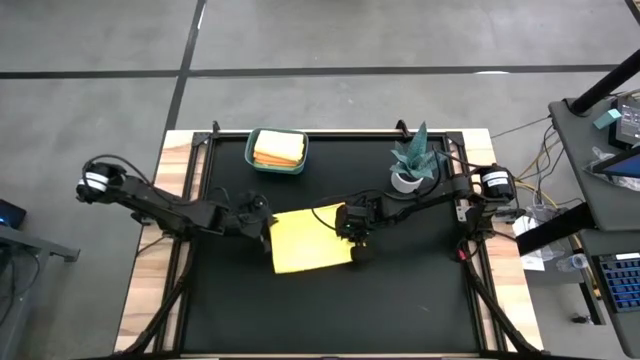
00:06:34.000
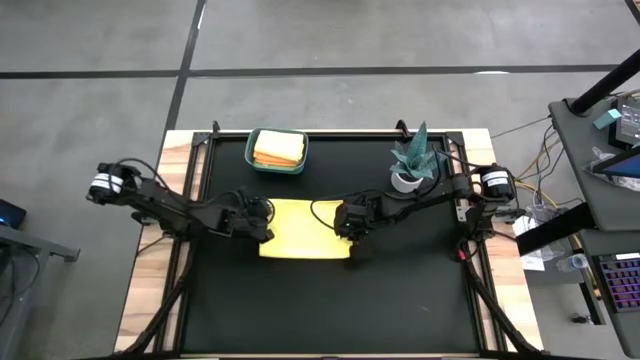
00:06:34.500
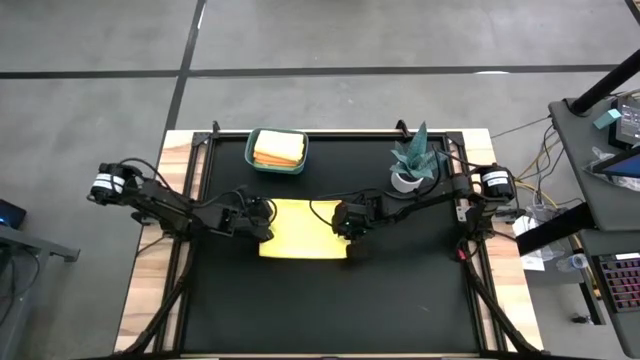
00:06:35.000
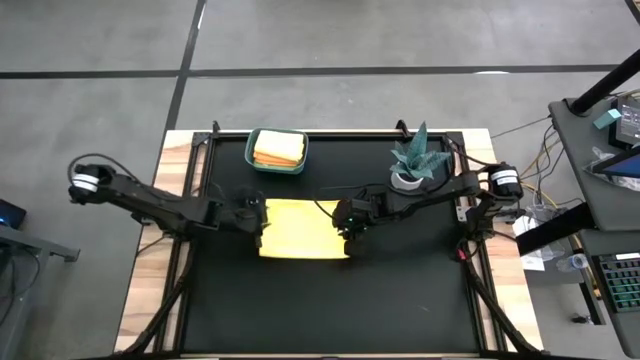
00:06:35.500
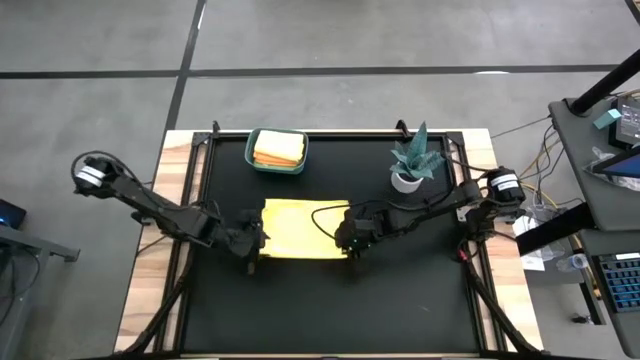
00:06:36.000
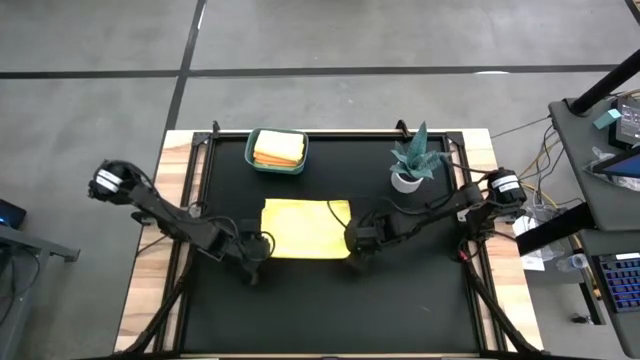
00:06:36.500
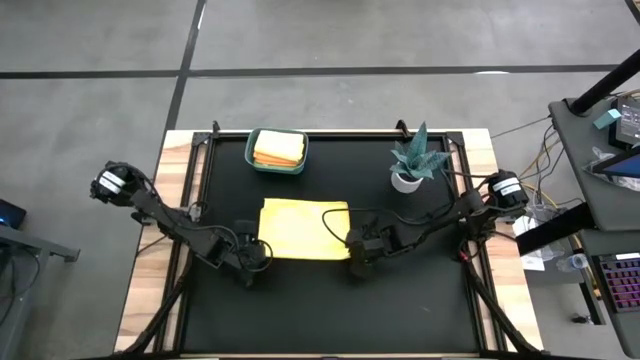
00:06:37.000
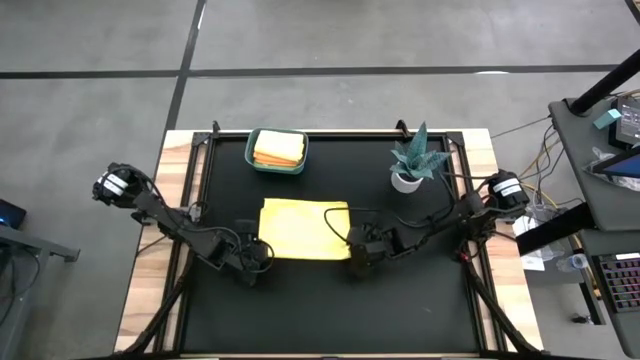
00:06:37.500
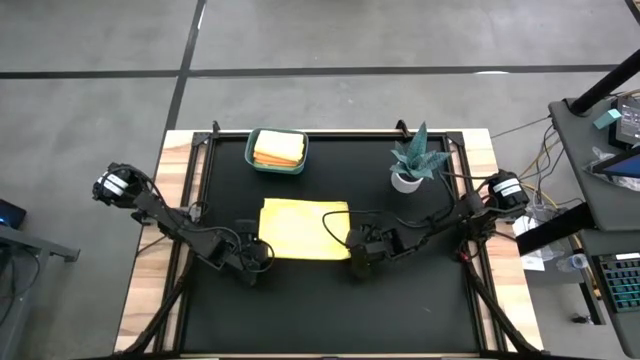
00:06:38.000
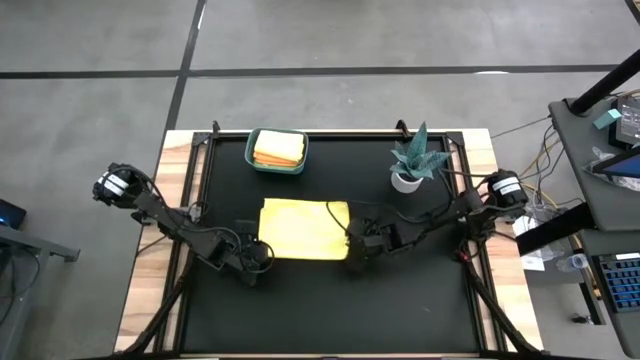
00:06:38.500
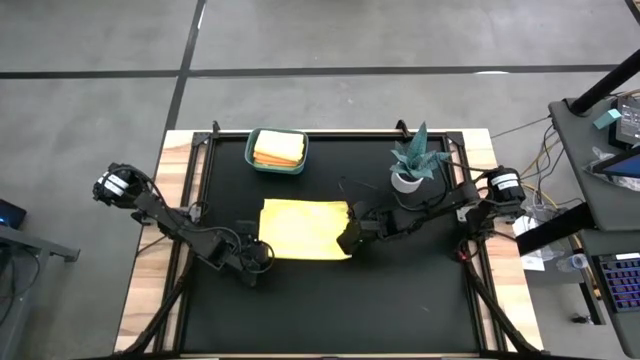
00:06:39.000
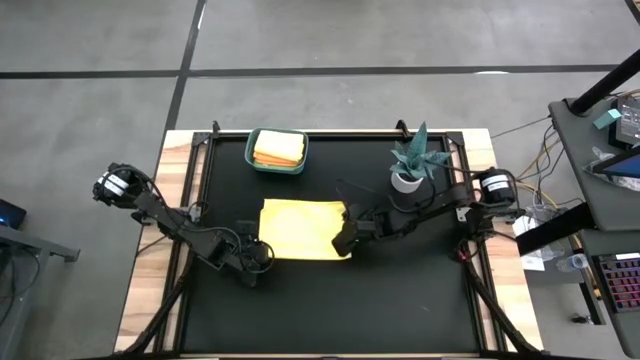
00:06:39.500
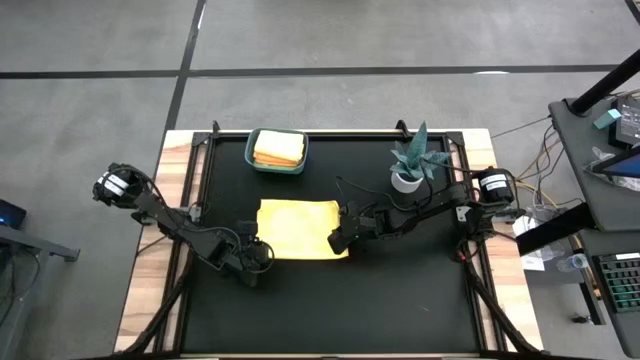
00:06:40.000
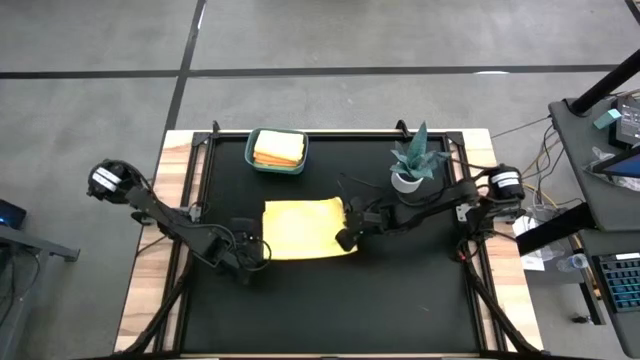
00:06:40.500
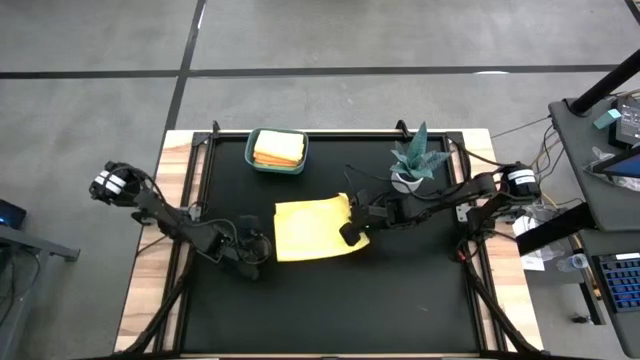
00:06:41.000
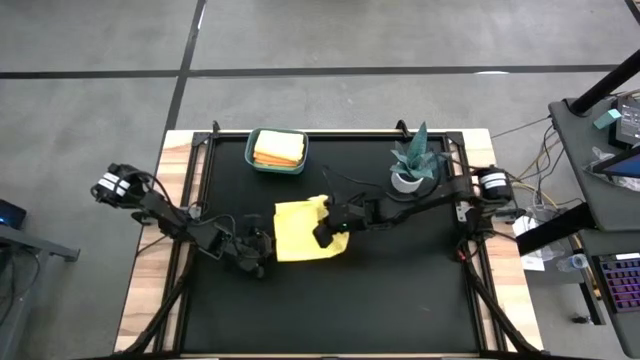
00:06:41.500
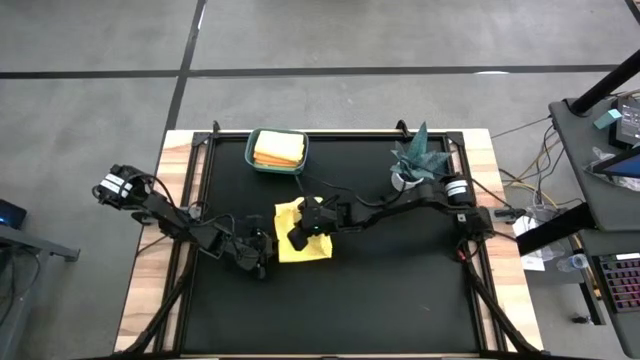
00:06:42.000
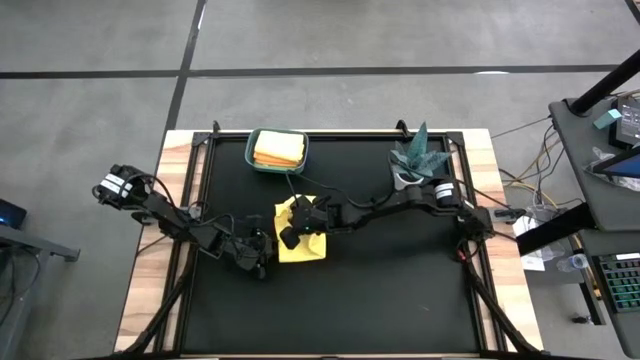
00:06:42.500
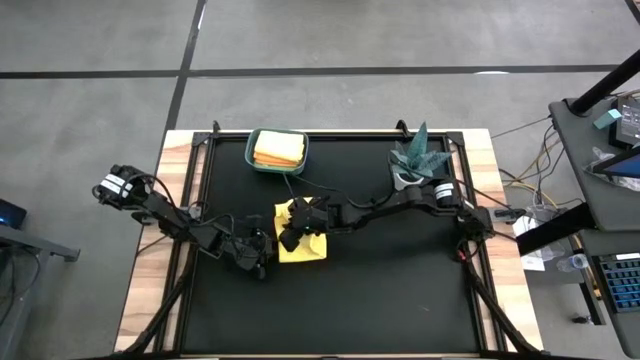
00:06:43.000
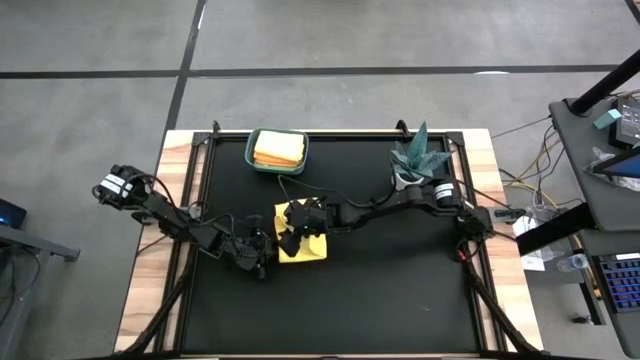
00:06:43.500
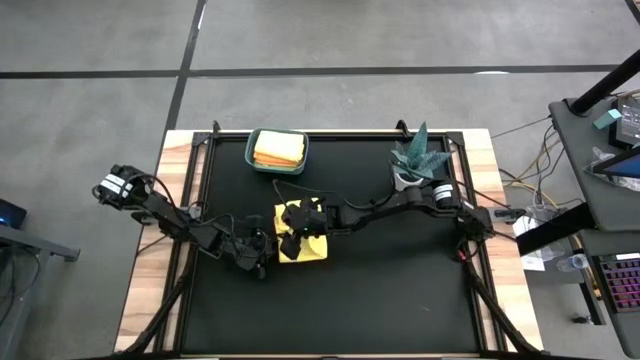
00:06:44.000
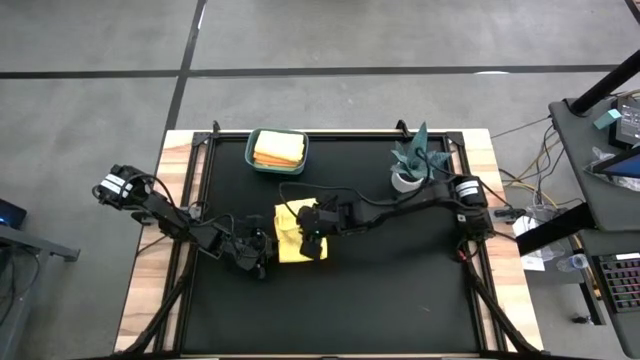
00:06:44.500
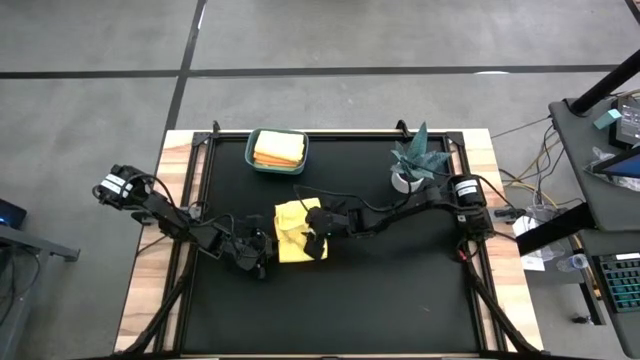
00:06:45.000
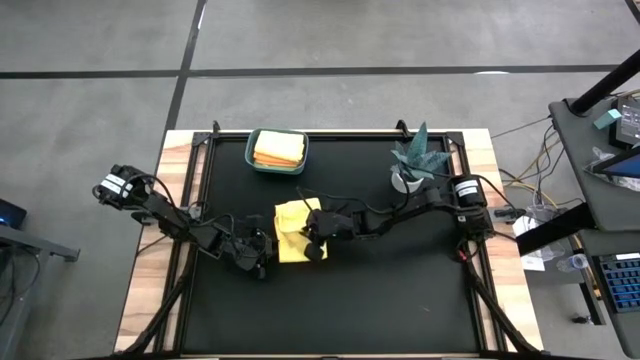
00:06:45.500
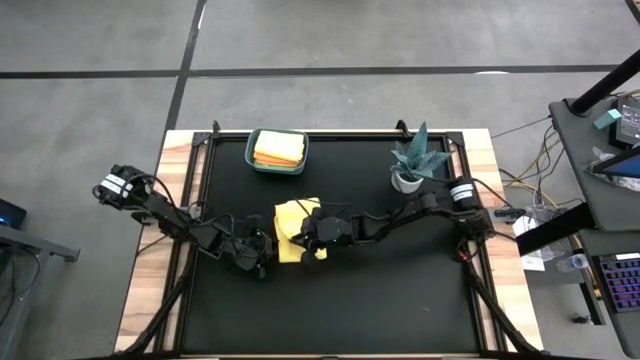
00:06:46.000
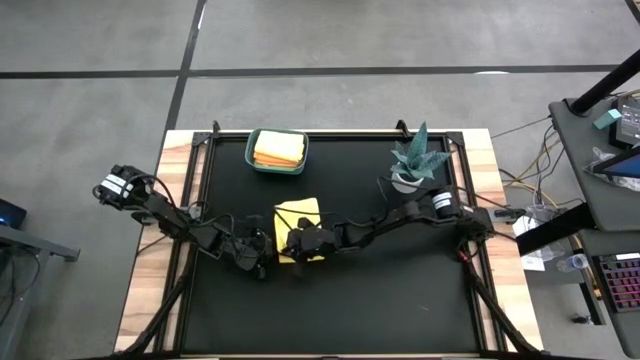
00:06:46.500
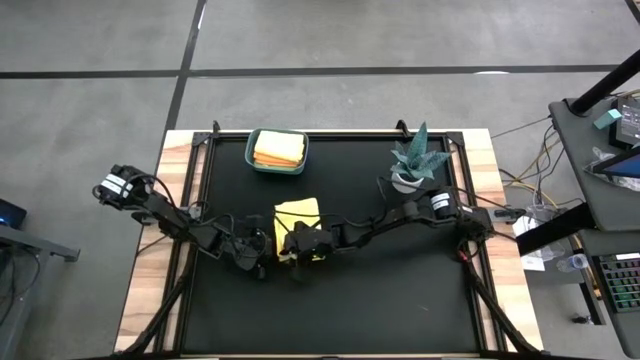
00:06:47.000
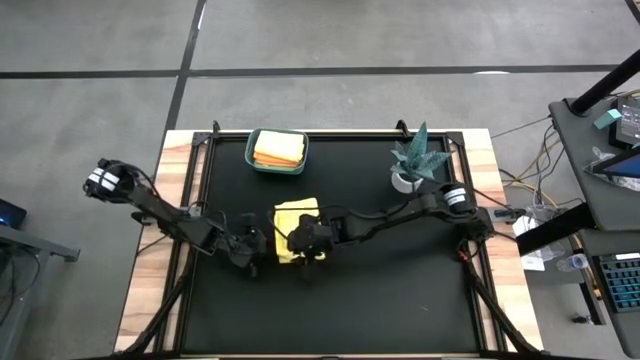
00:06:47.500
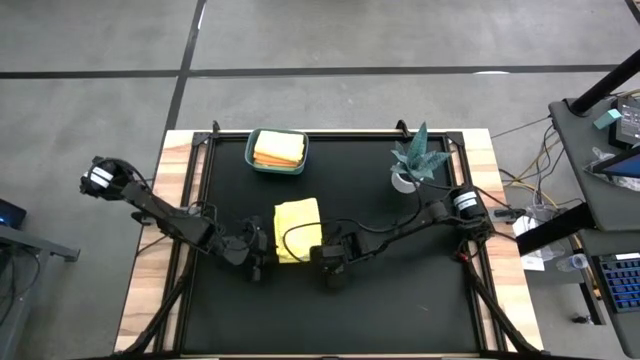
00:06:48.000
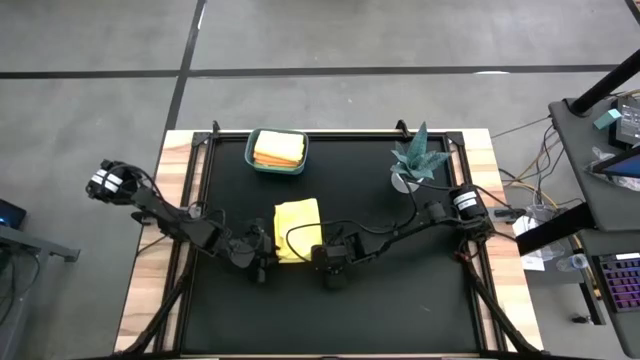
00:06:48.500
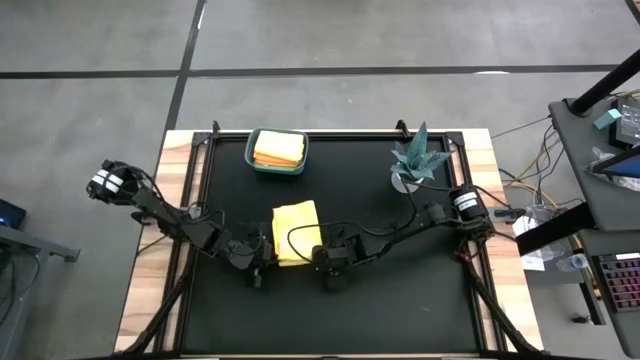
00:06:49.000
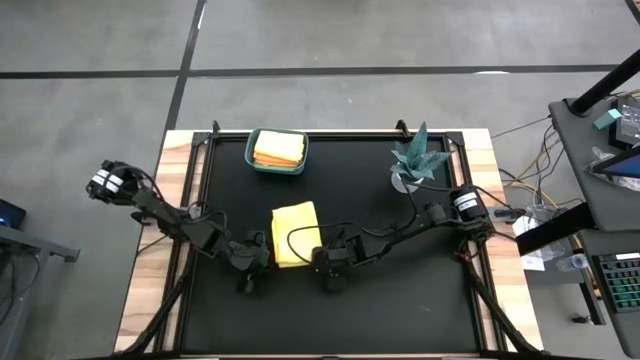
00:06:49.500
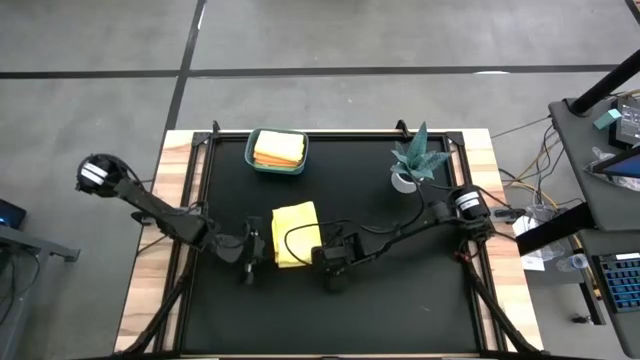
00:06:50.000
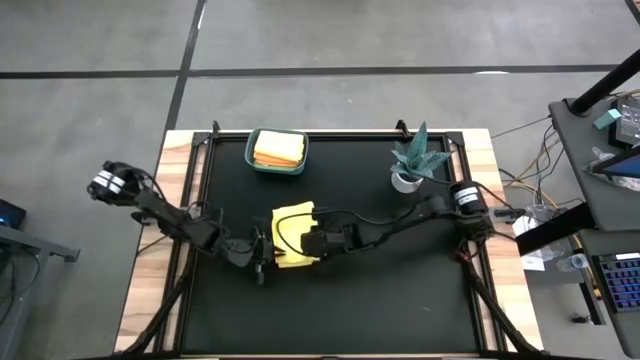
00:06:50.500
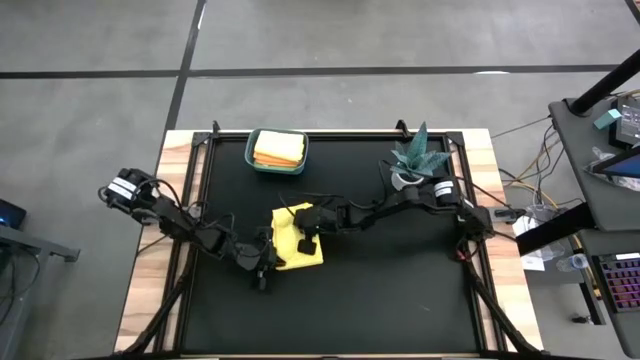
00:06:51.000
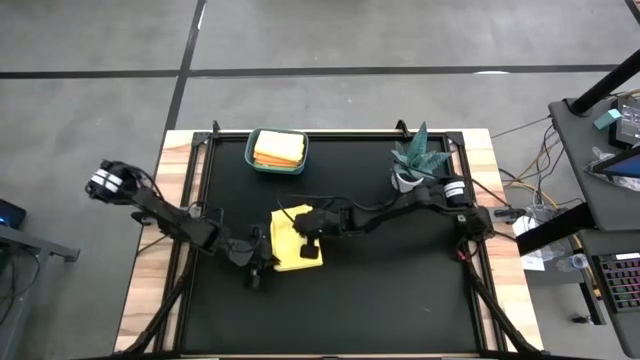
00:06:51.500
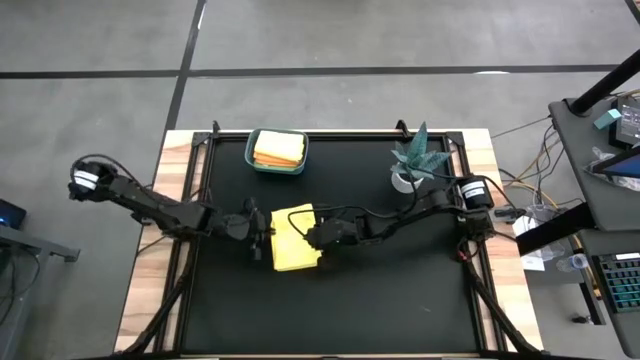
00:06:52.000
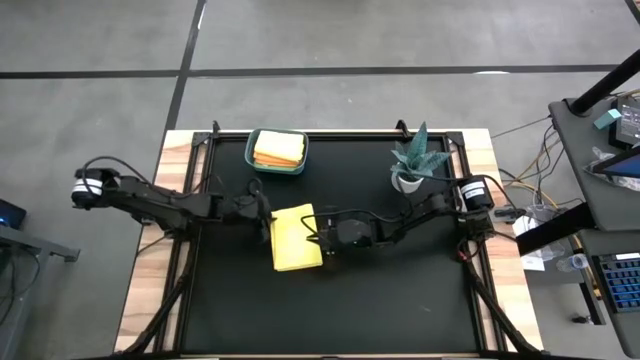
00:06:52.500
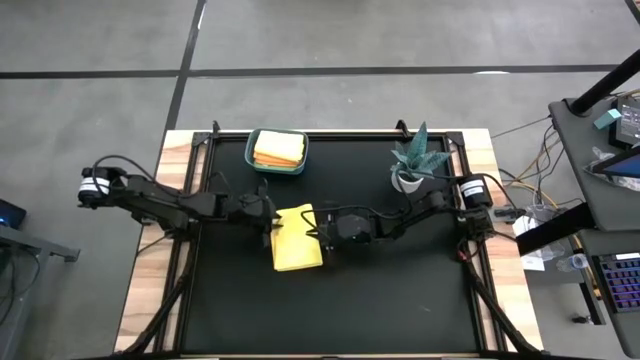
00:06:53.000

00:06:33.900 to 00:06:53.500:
Task: Fold microfiber towels
Fold the yellow microfiber cloth

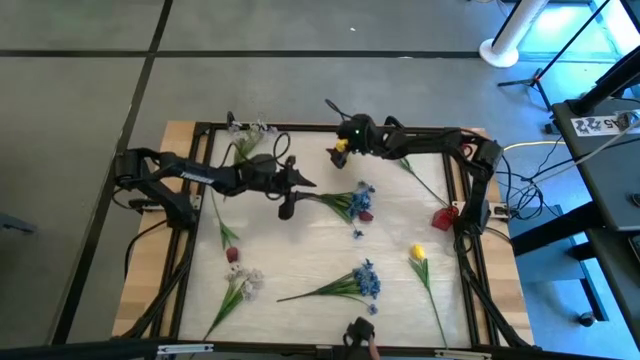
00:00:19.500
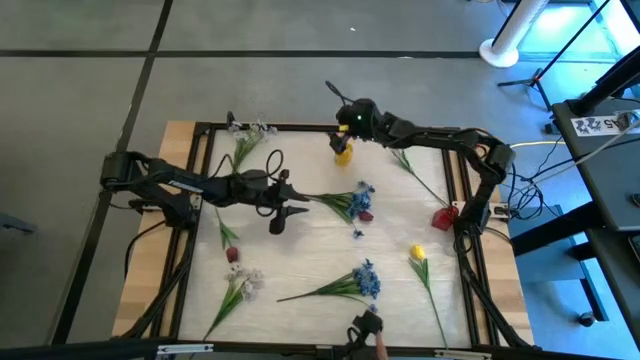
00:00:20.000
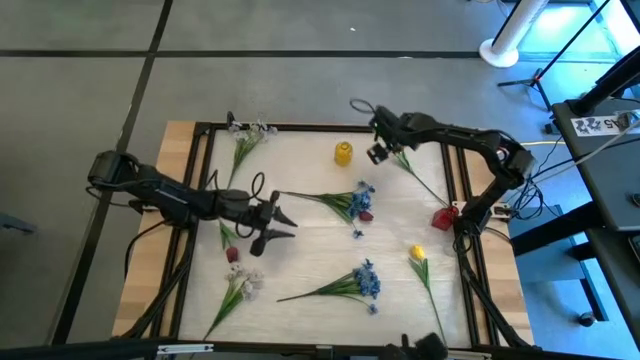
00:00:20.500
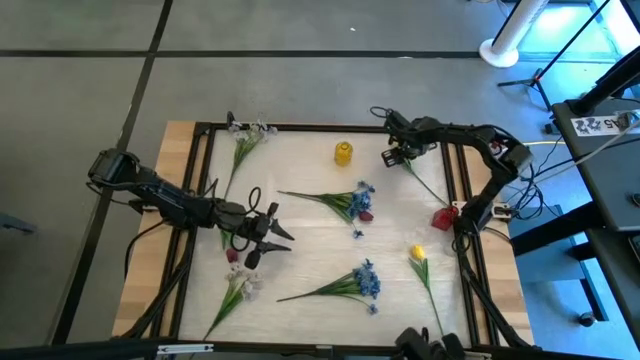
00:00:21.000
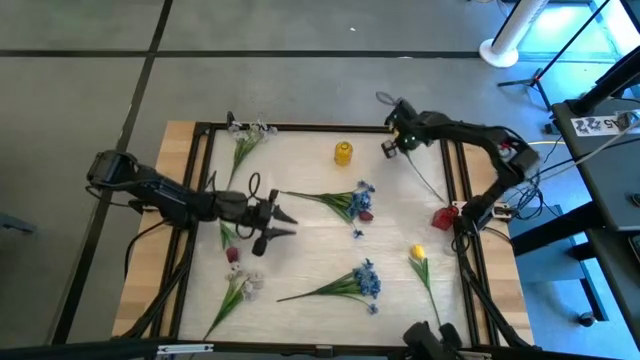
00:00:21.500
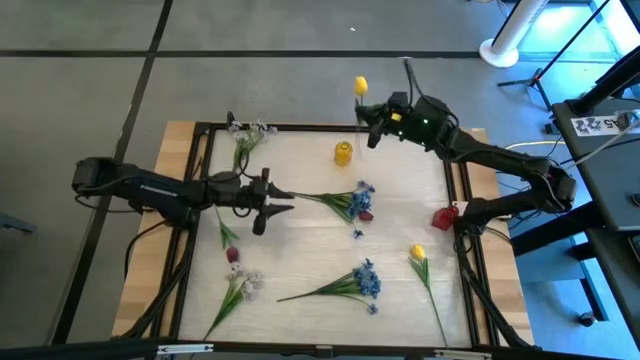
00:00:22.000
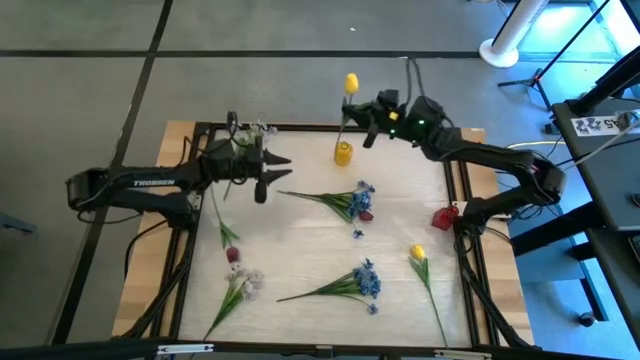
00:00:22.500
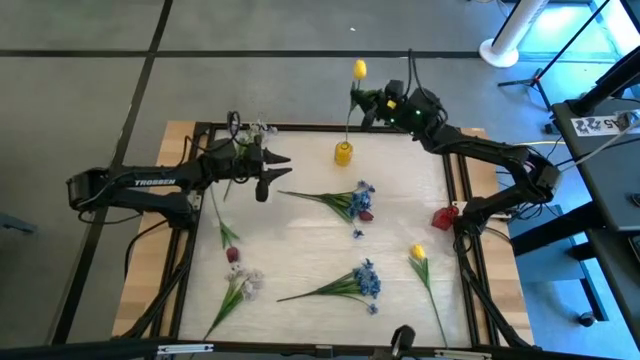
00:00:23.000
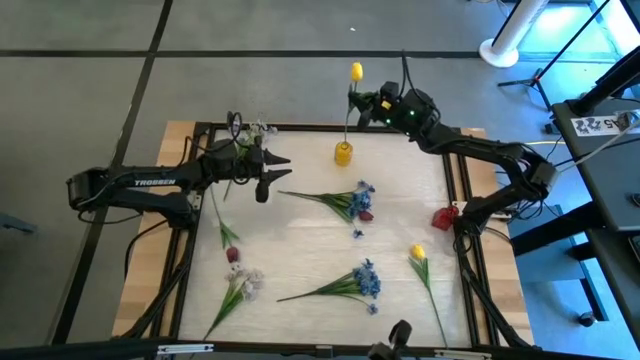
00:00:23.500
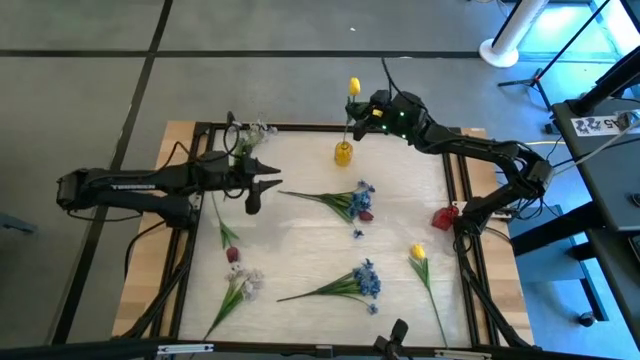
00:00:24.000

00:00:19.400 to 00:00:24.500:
Task: Sort flowers into vase by color
Put the top yellow flower into the yellow vase
